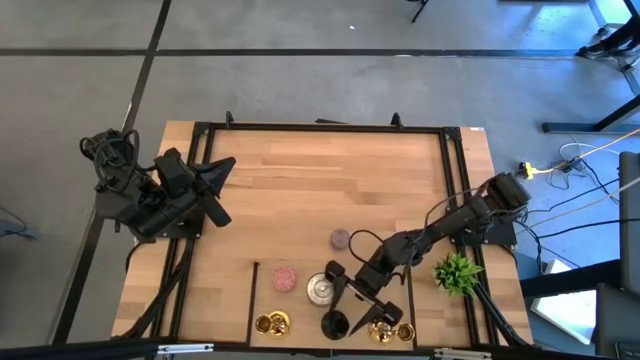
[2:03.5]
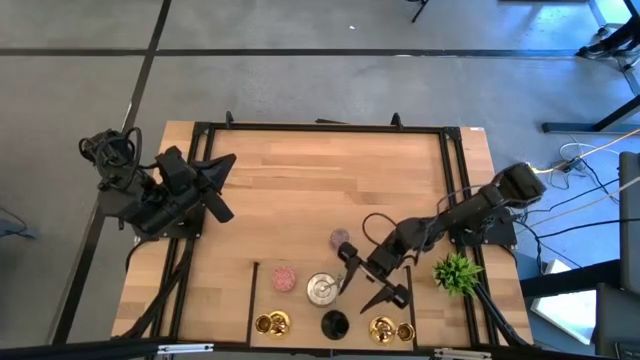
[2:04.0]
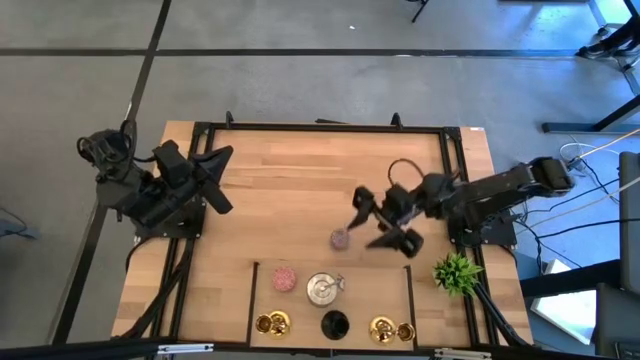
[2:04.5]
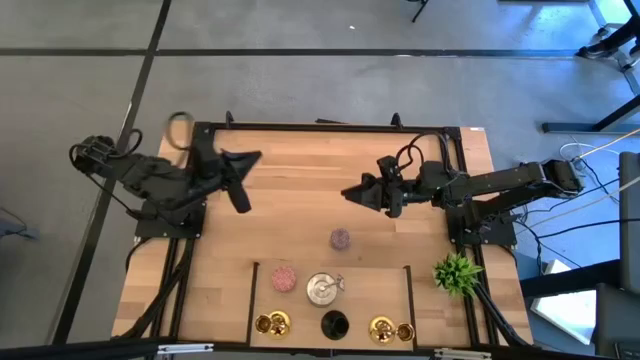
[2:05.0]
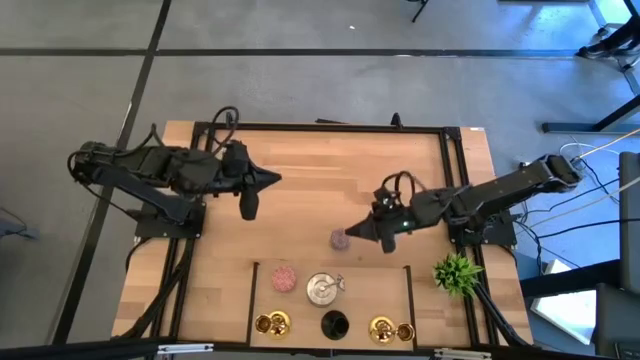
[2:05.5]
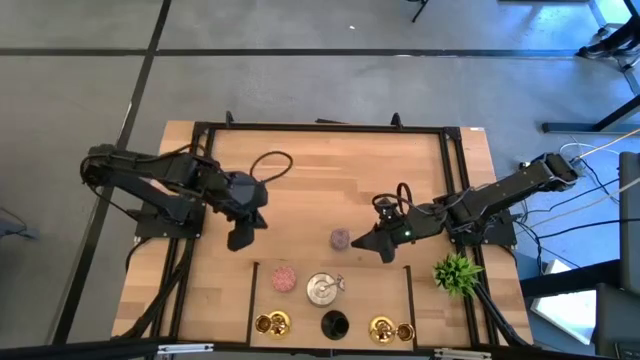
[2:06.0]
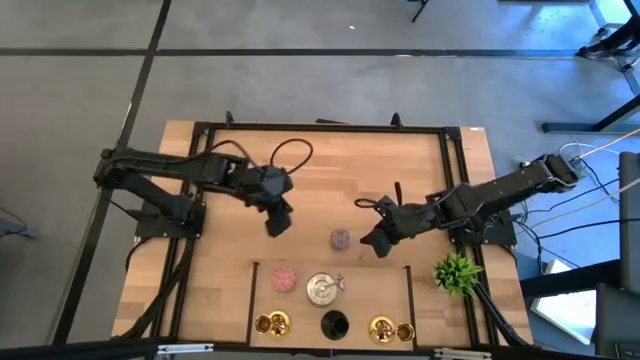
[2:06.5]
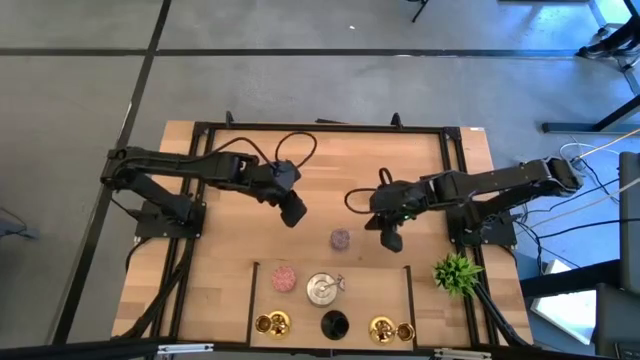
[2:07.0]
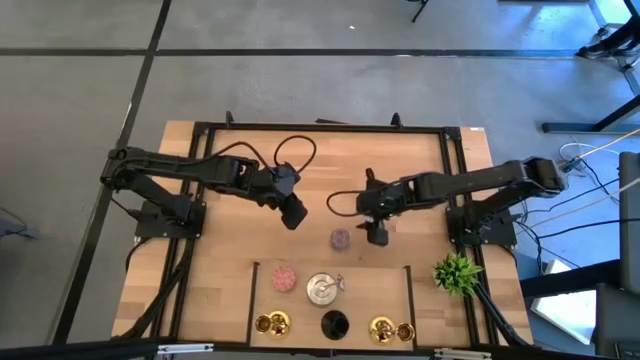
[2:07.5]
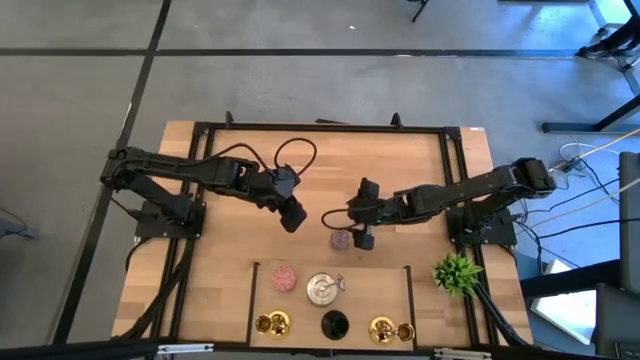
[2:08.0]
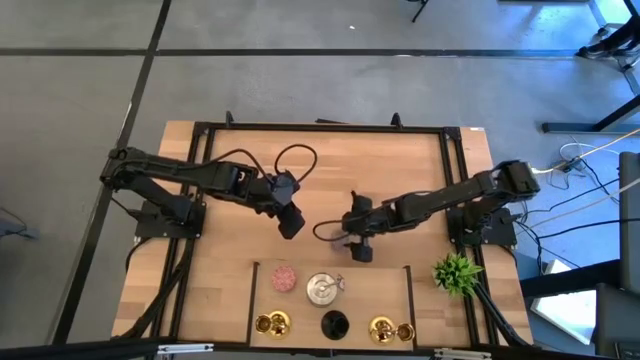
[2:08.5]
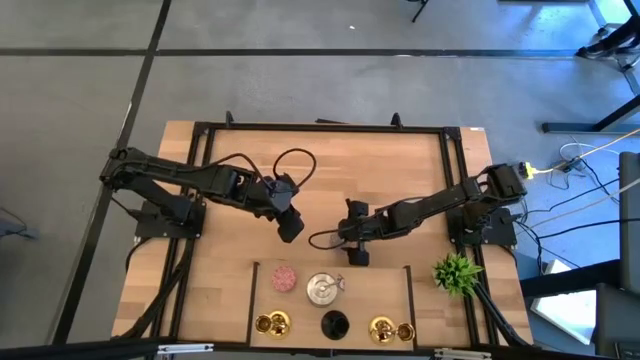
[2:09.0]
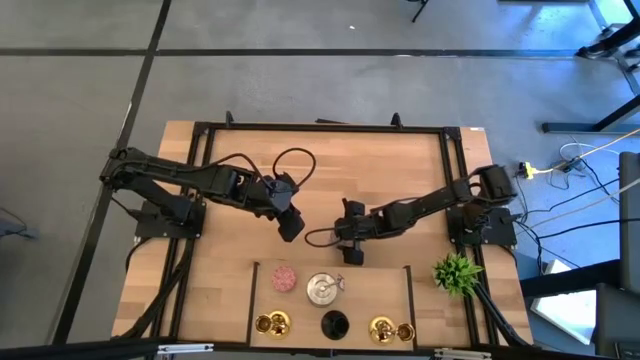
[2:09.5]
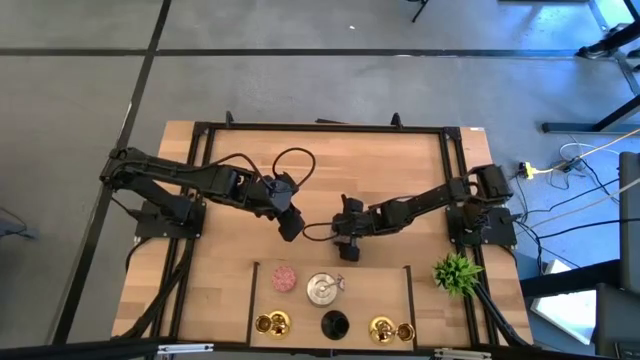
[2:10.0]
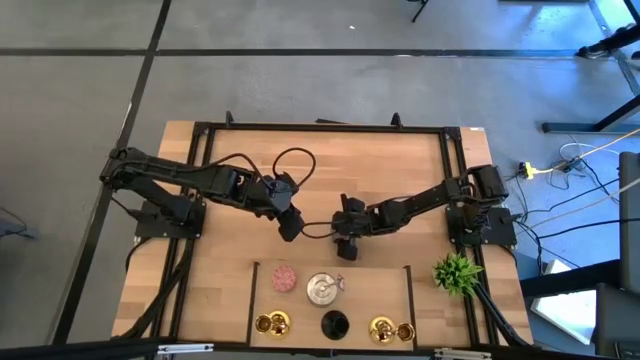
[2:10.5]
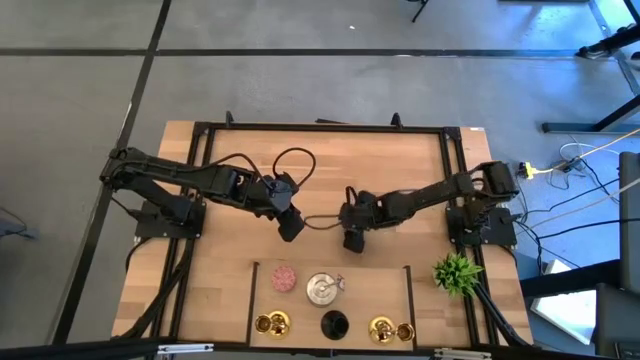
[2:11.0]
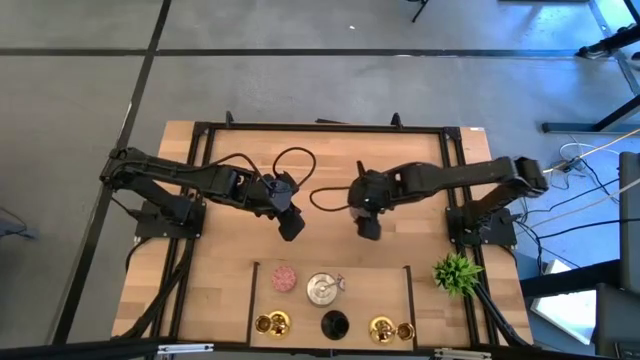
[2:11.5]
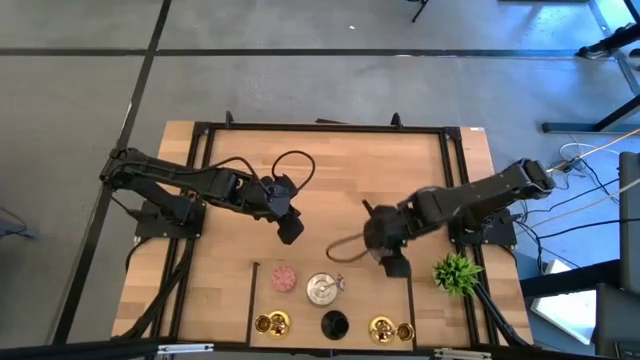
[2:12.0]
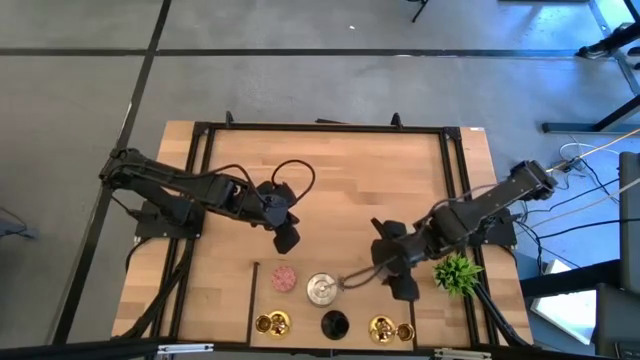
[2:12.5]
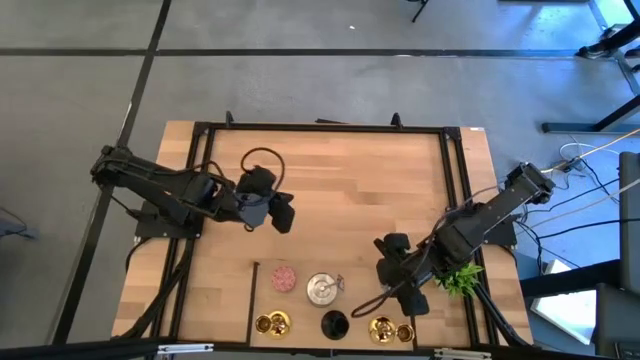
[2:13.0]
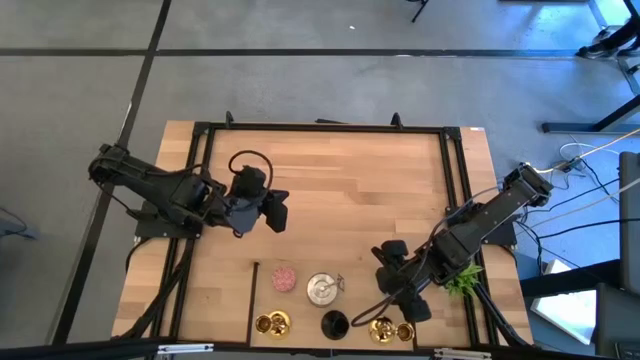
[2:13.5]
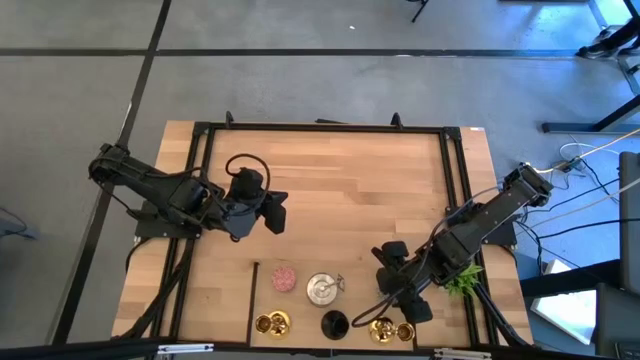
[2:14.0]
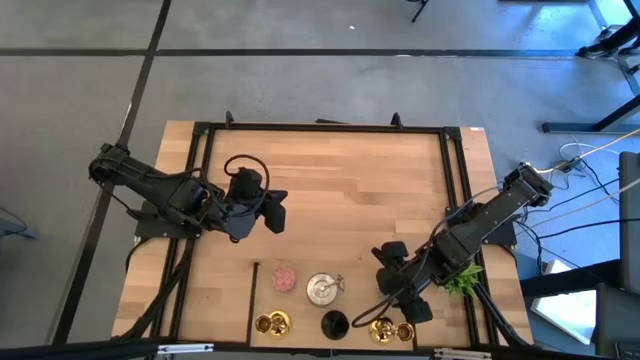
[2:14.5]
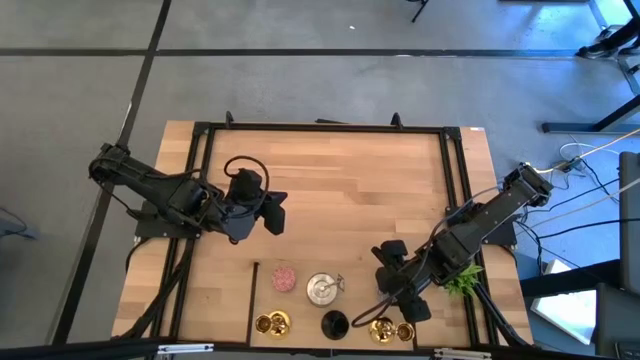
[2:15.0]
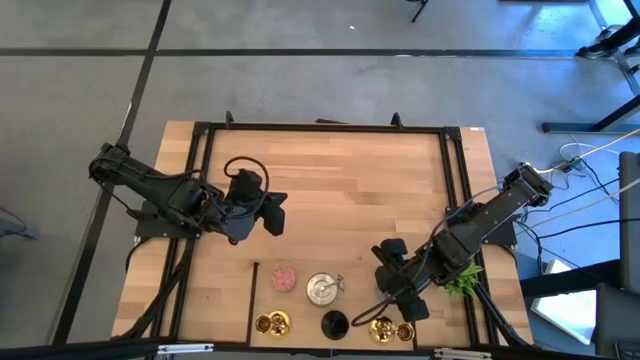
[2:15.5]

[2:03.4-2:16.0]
Task: Pick & Place candle stick holders
Put the red scented candle on the shelf

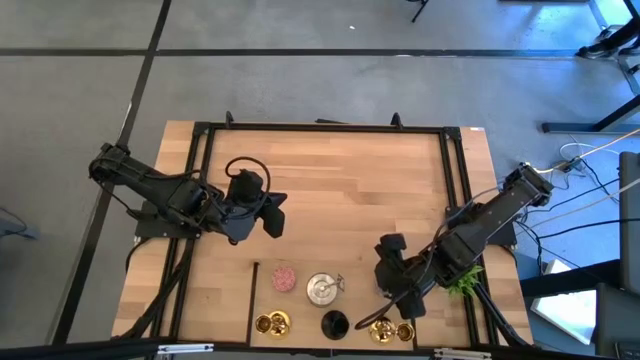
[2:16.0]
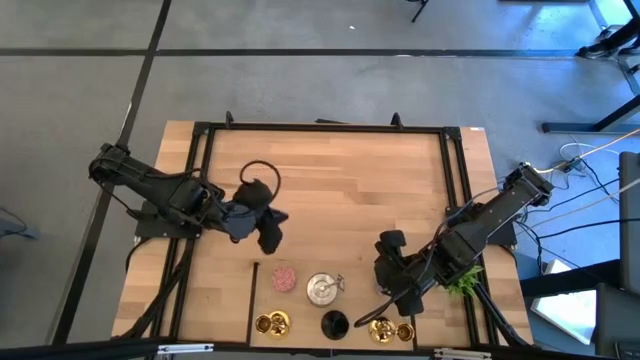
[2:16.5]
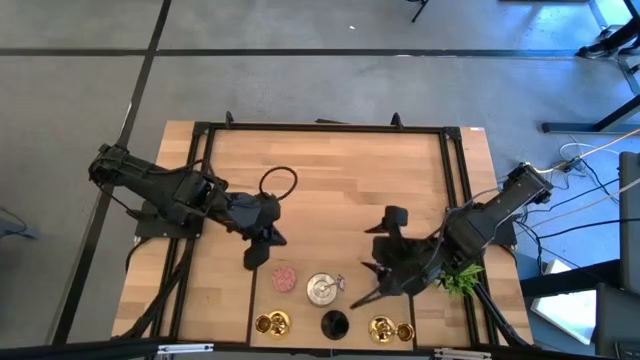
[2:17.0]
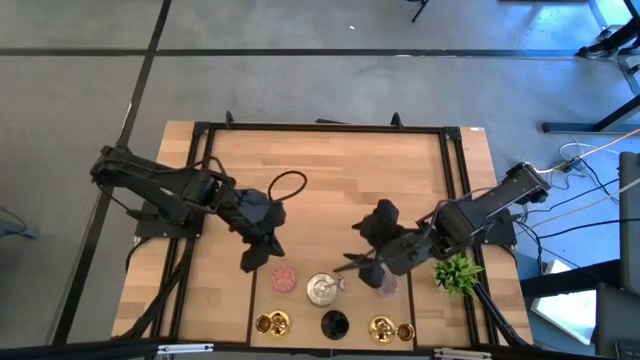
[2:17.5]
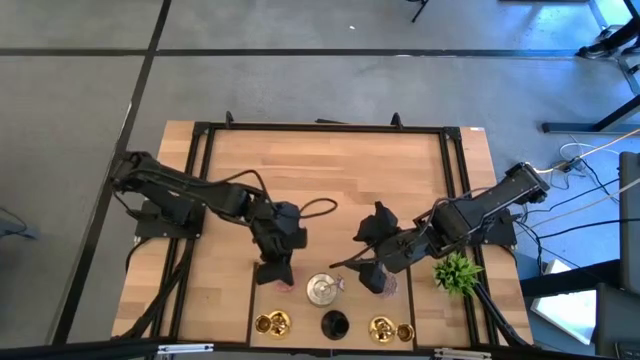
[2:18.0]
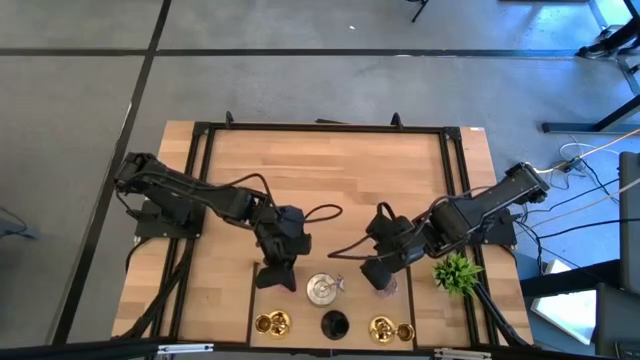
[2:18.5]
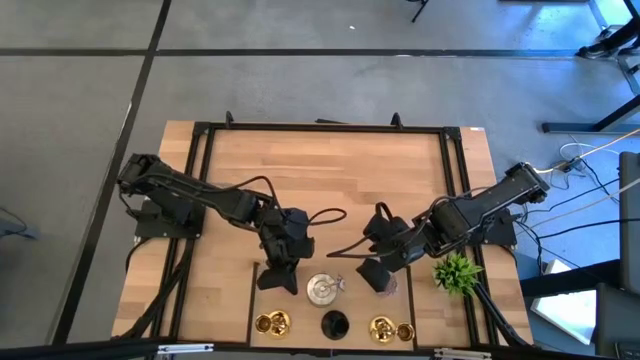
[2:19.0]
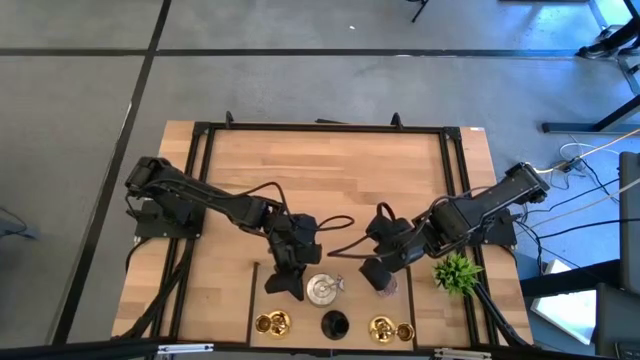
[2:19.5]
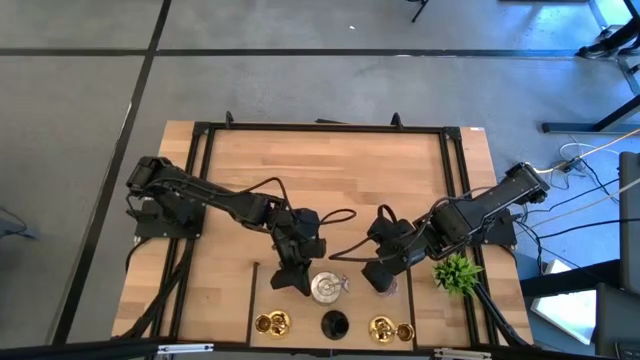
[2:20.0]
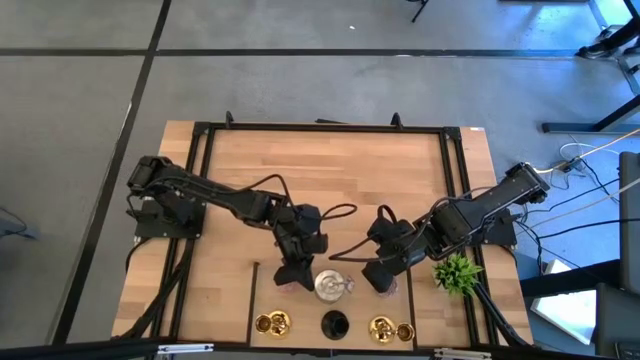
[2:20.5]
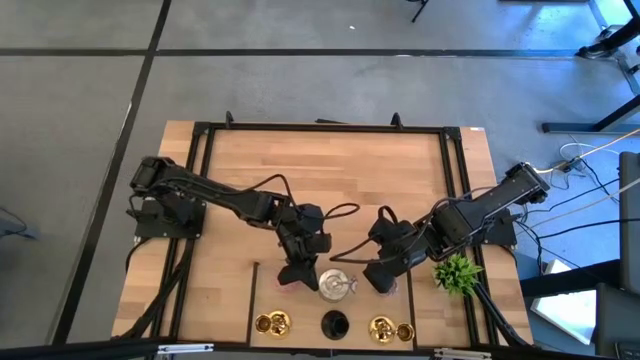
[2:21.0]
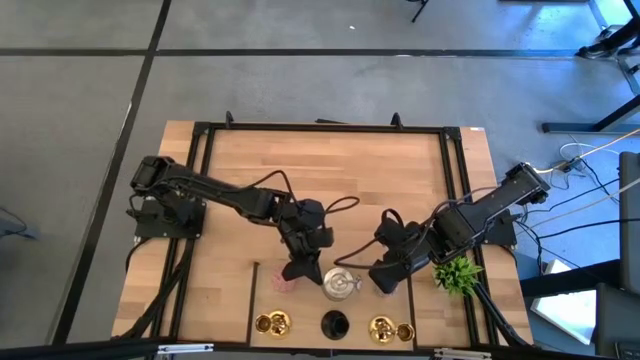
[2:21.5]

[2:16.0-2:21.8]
Adjust the silver scented candle on the shelf

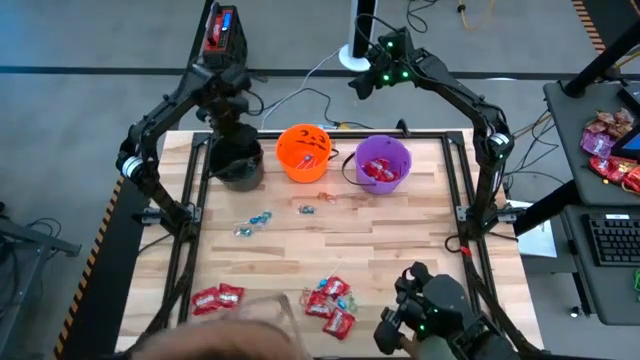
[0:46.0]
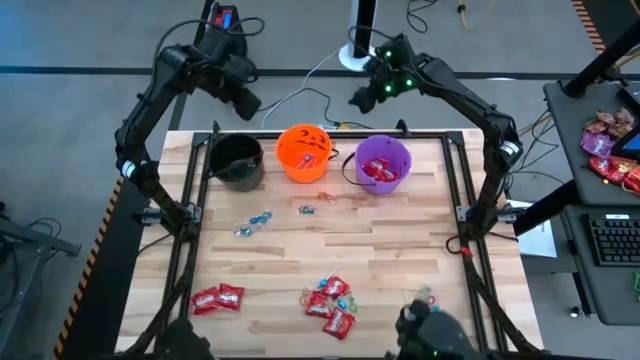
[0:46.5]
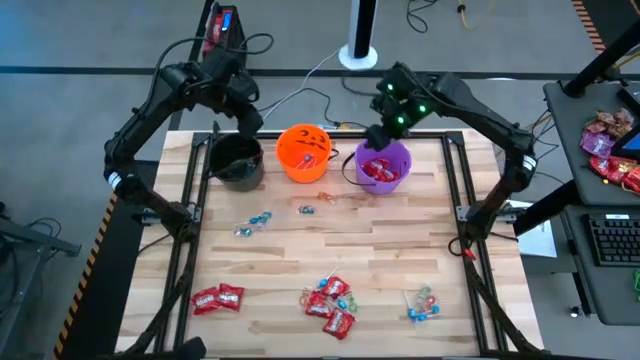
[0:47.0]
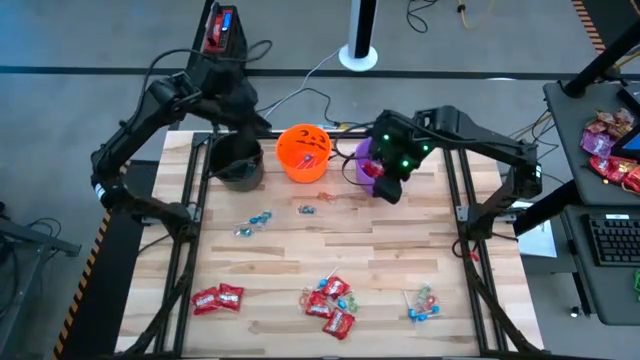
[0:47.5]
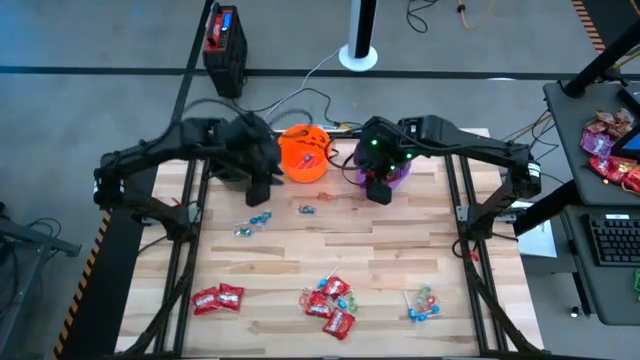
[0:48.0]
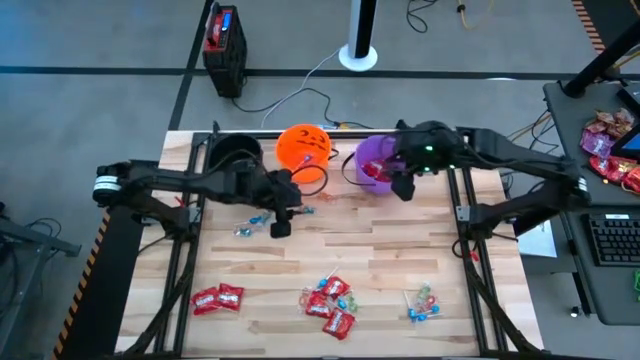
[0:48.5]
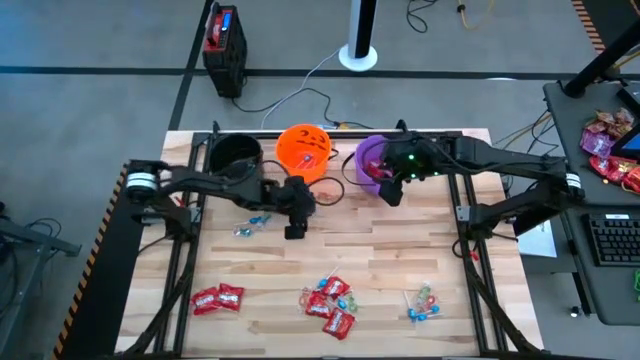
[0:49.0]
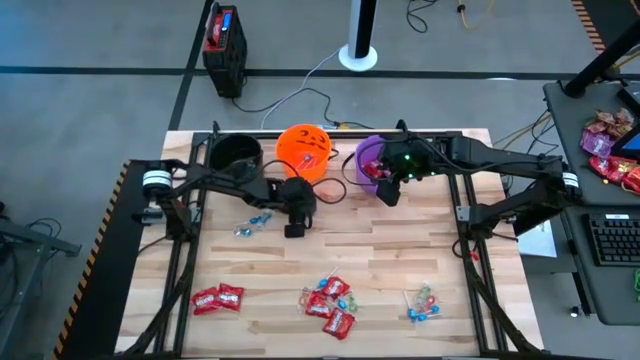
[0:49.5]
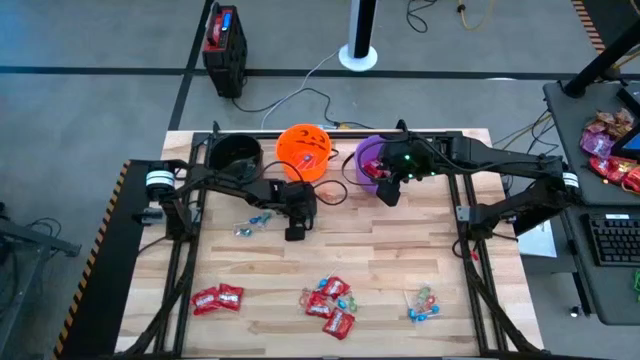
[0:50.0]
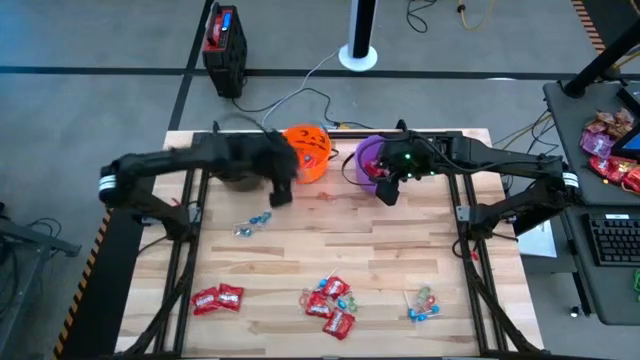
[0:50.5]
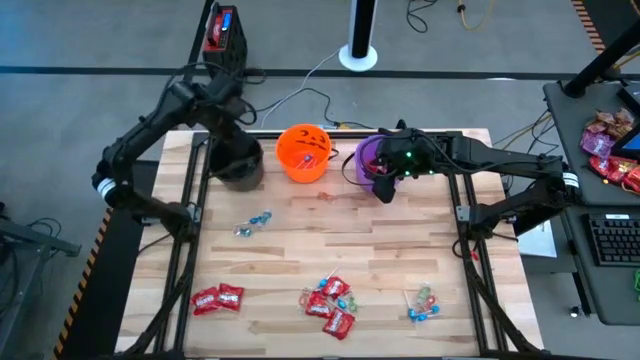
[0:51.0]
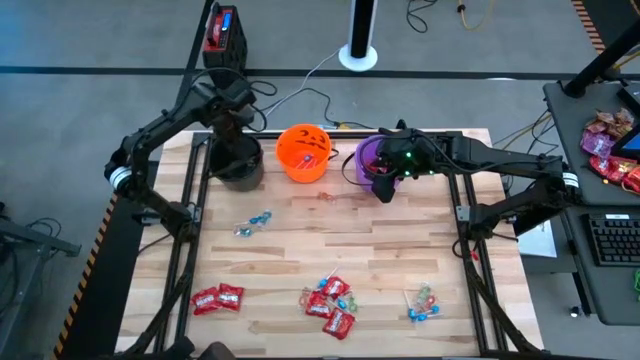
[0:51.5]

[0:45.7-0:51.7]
Task: Sort candy by brand, put in halloween buckets
Put the blue gummy into the black bucket
